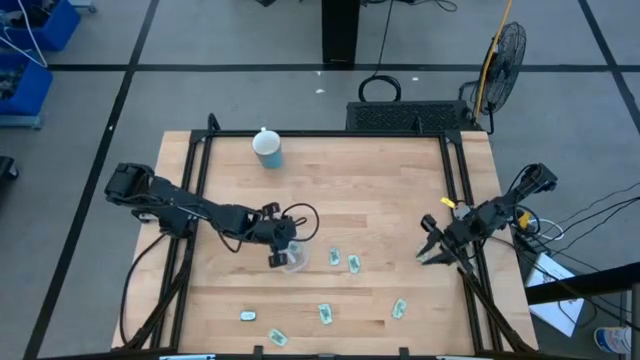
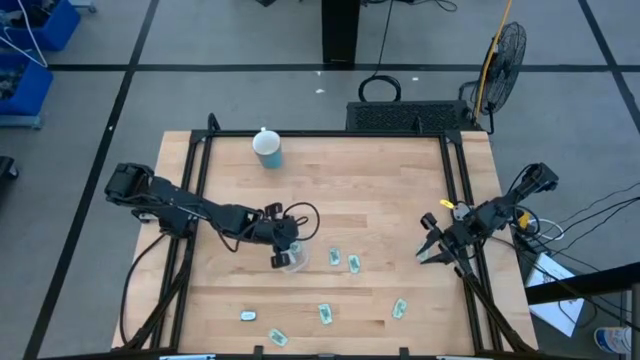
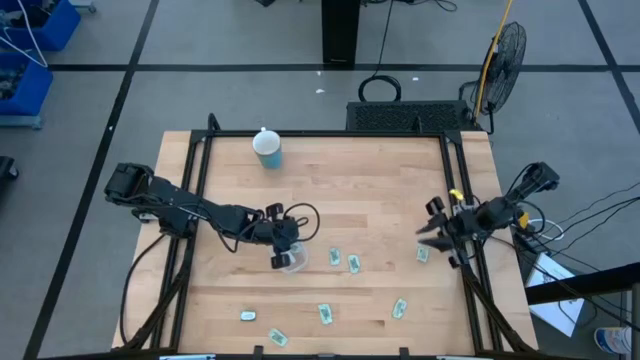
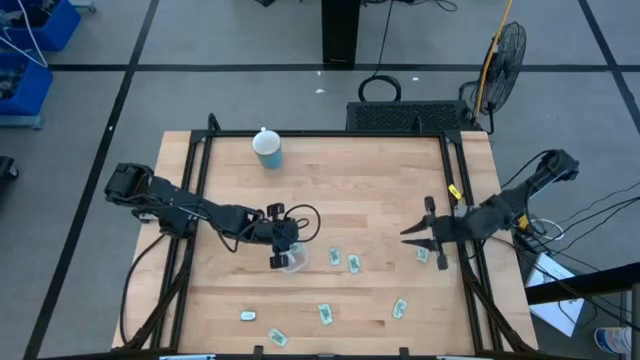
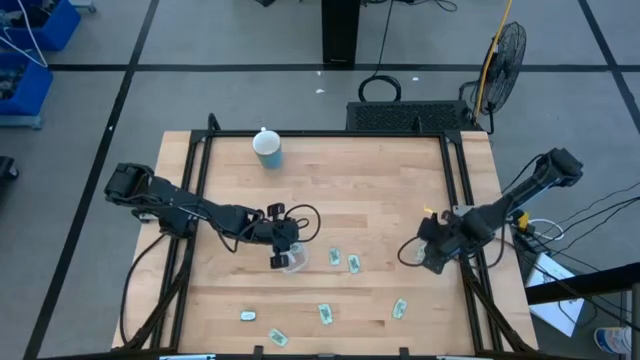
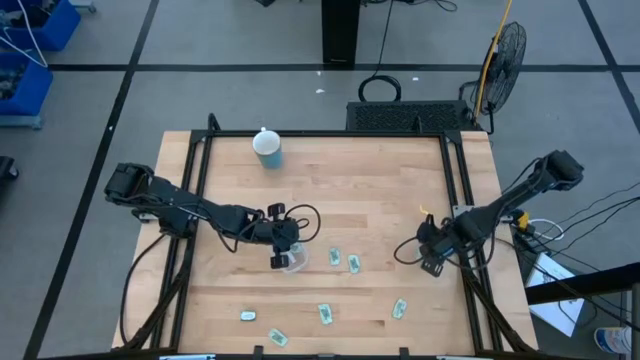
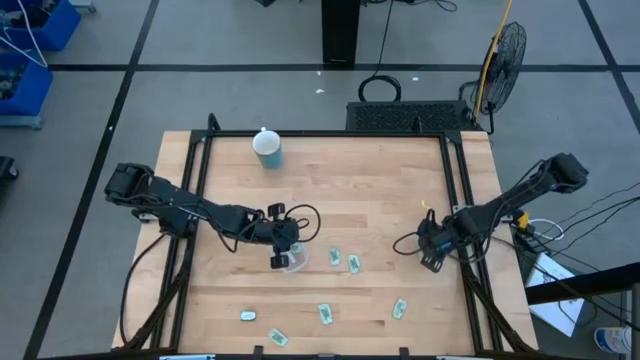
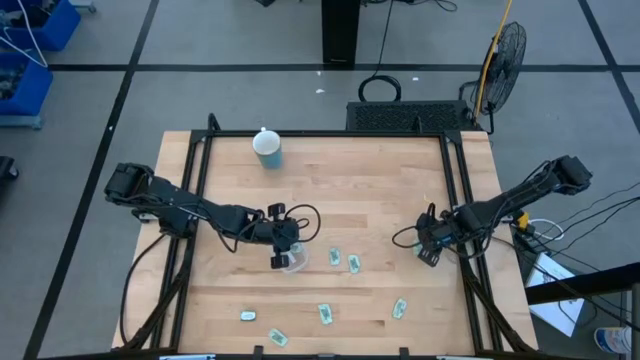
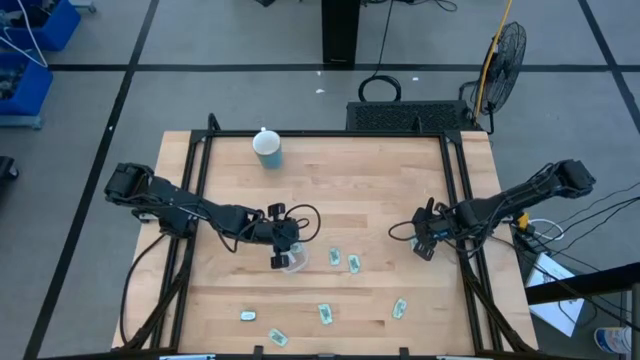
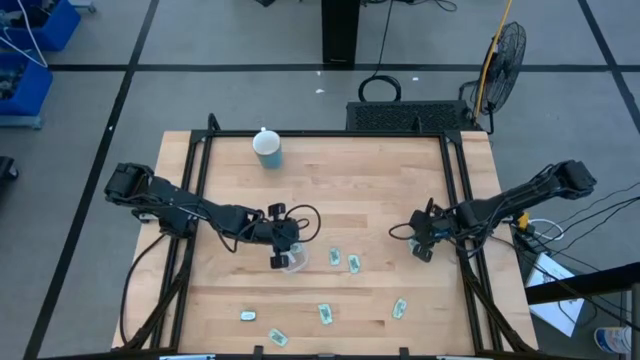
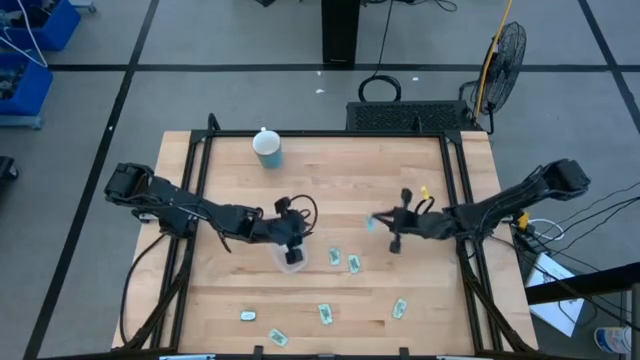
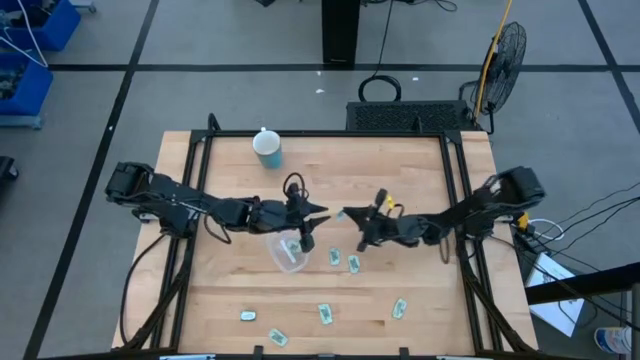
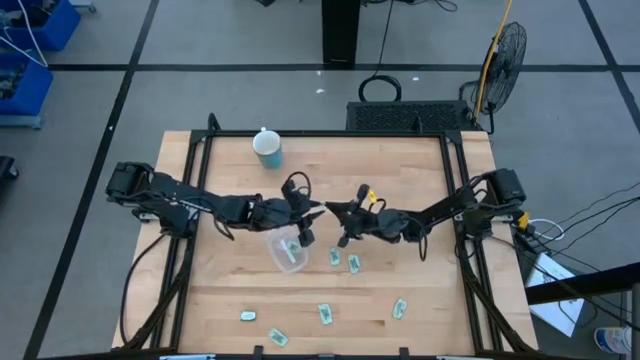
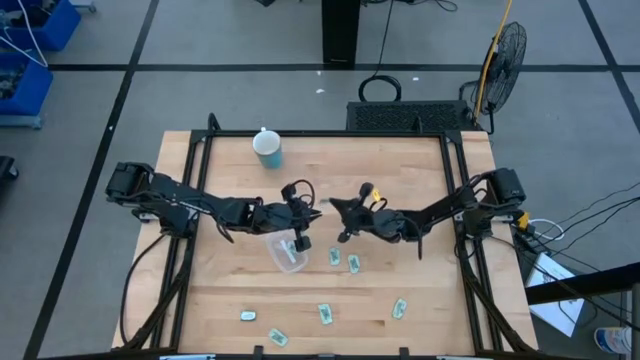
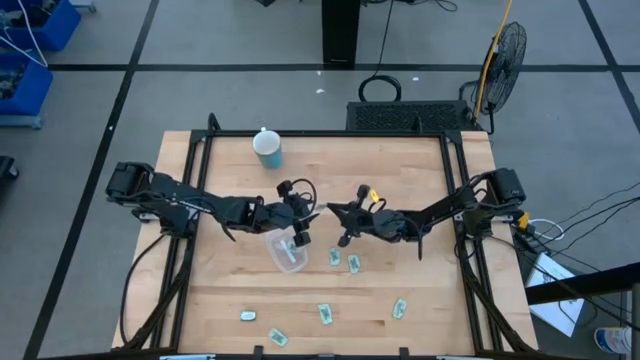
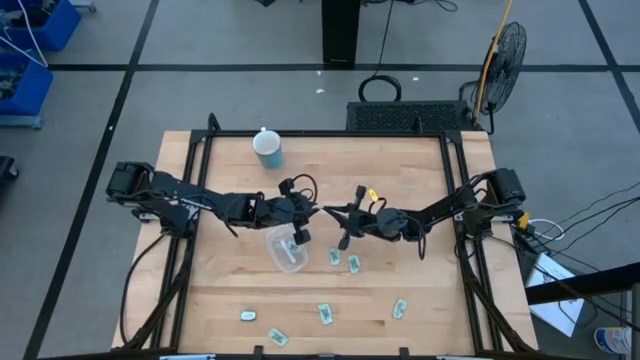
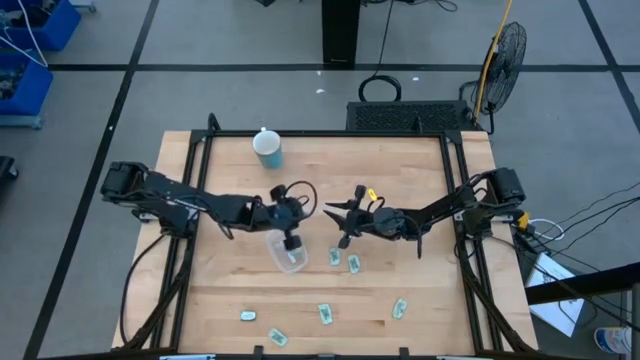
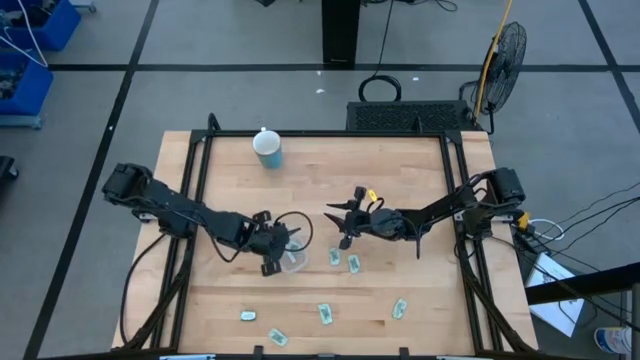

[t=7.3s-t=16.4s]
Task: Pick and place Stevia / Truvia into bins
Put the stevia packet into the transparent container

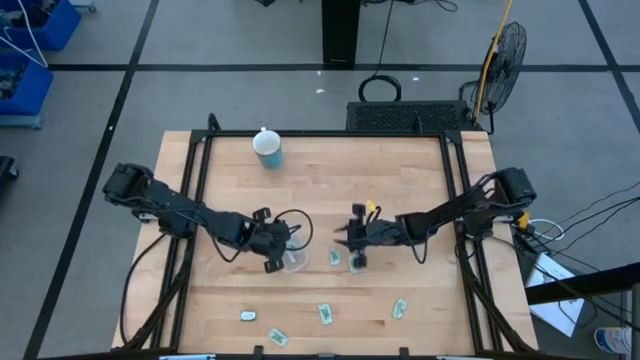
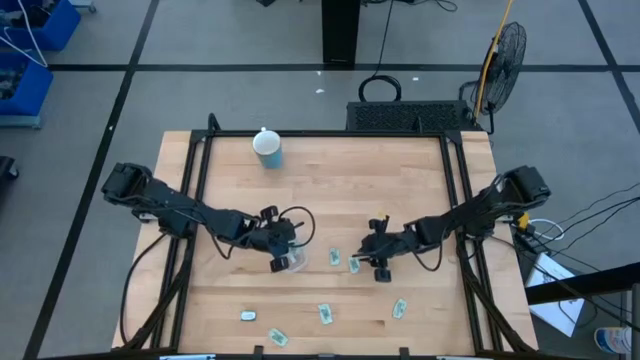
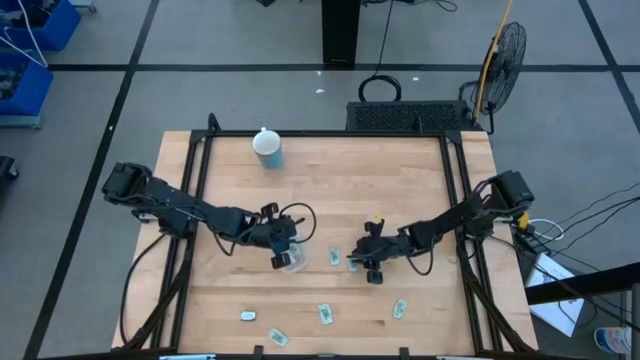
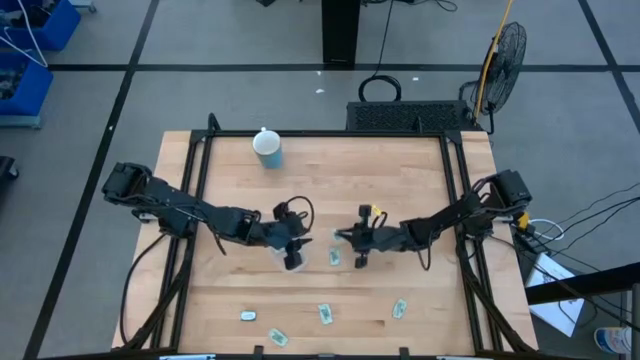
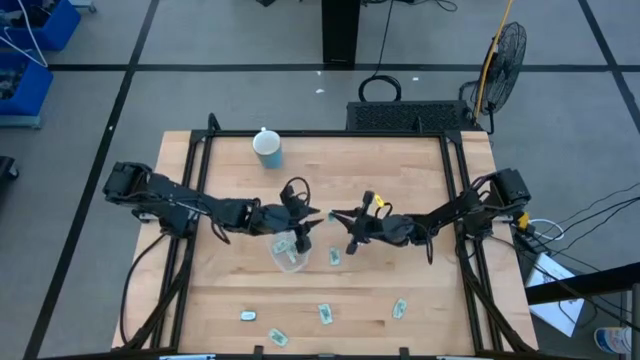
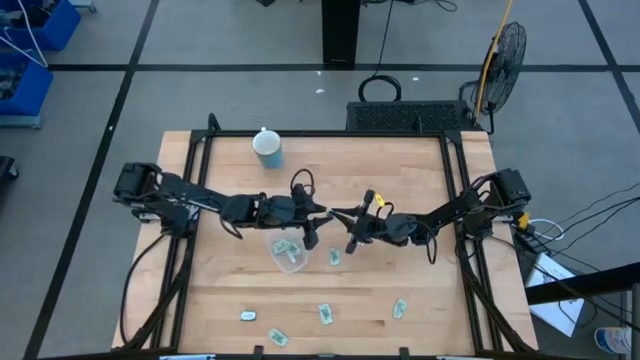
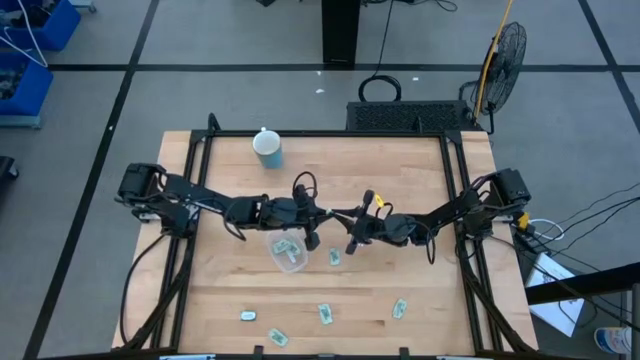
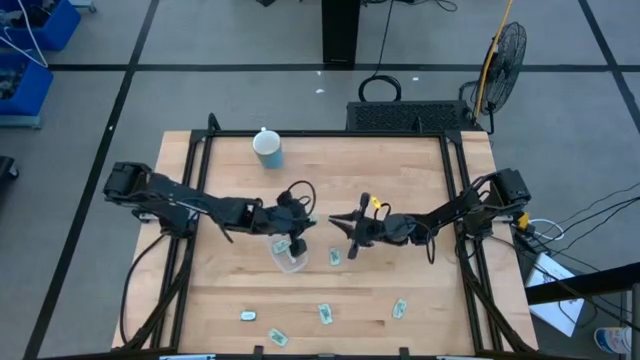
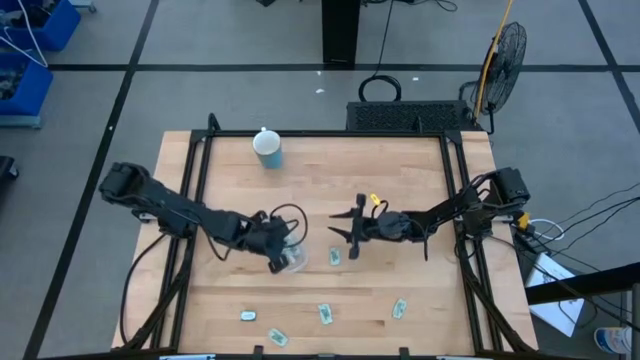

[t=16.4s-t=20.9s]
Put the stevia packet into the transparent container

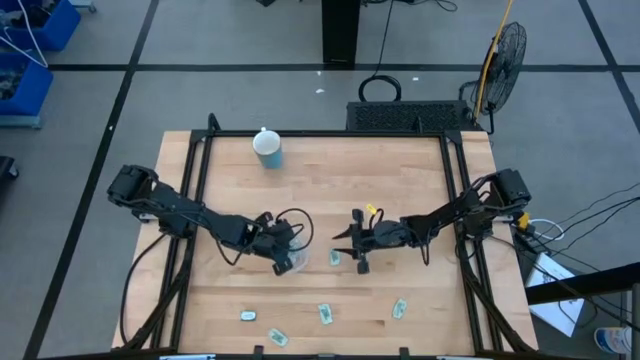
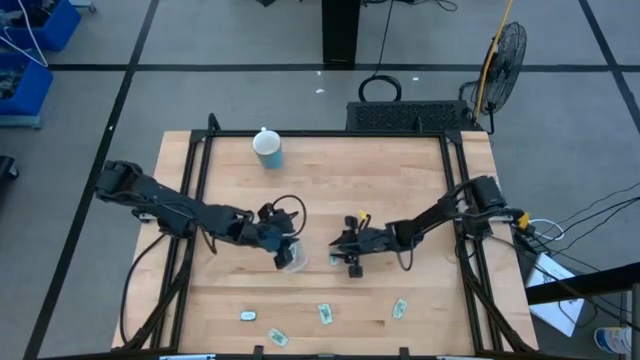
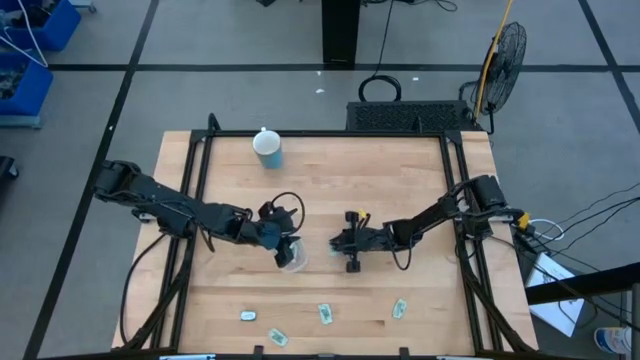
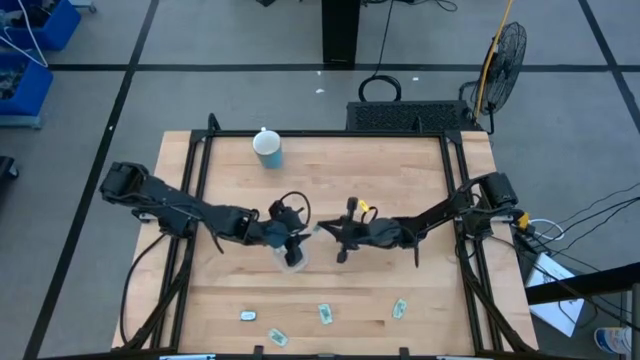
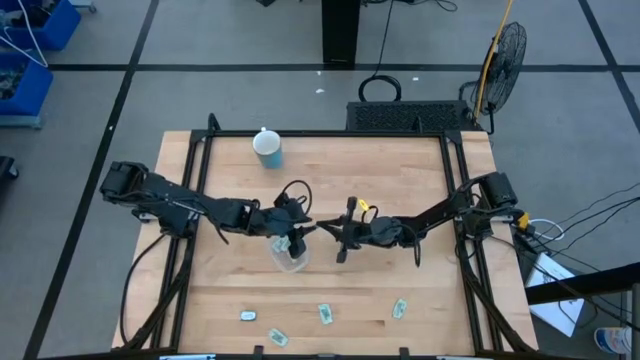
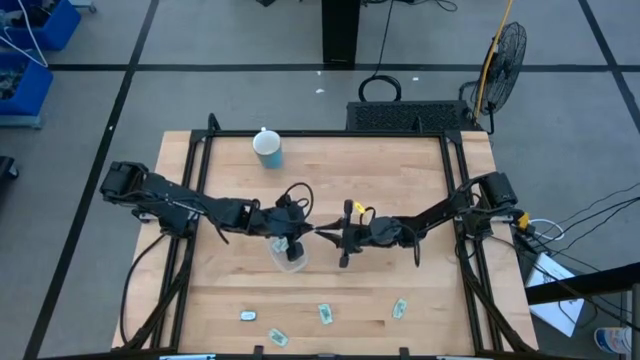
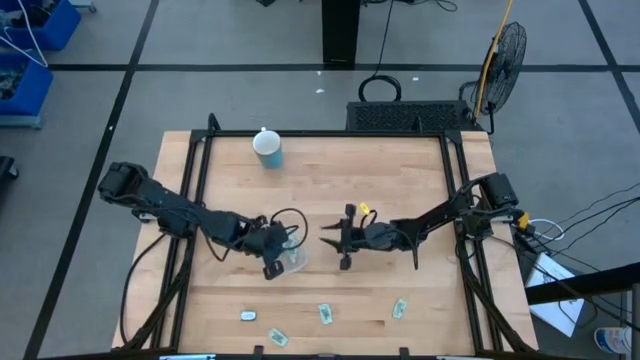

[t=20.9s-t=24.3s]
Put the stevia packet into the transparent container

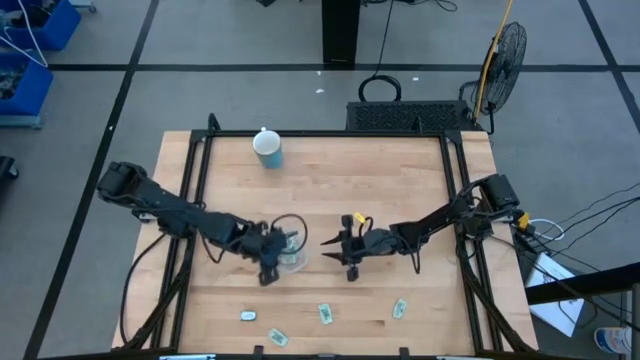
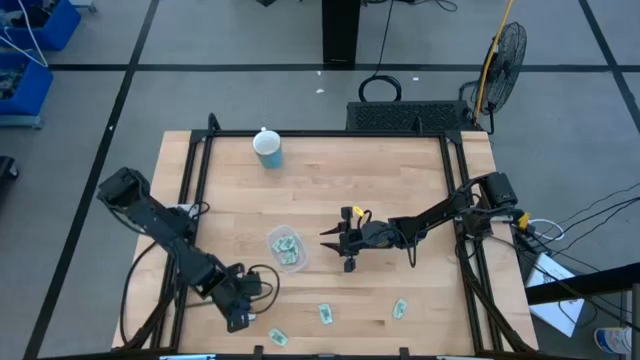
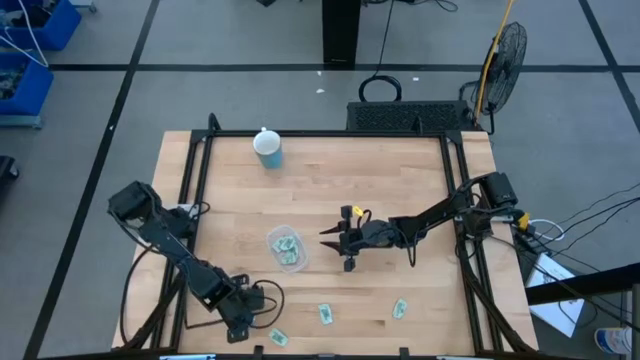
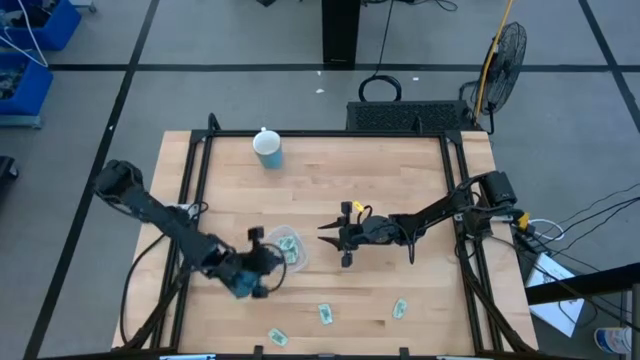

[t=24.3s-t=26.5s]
Put the stevia packet into the transparent container

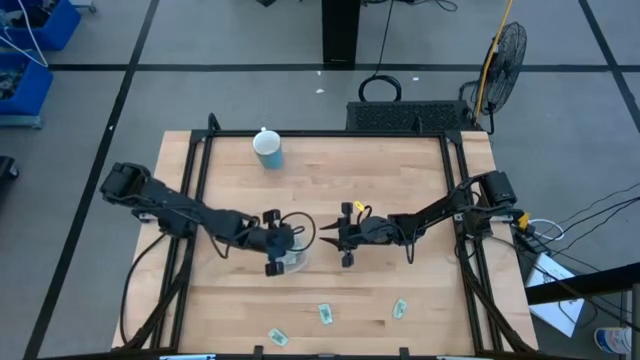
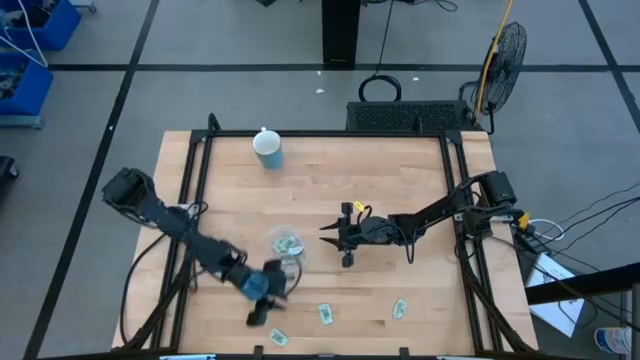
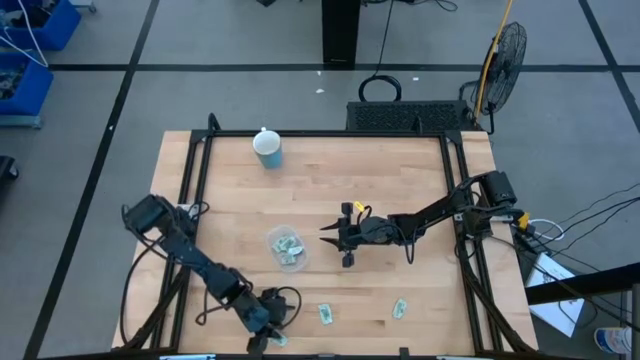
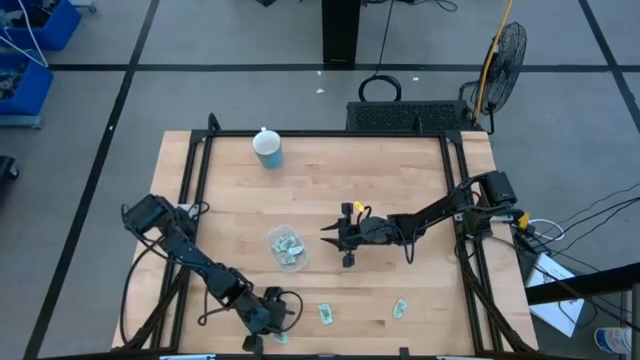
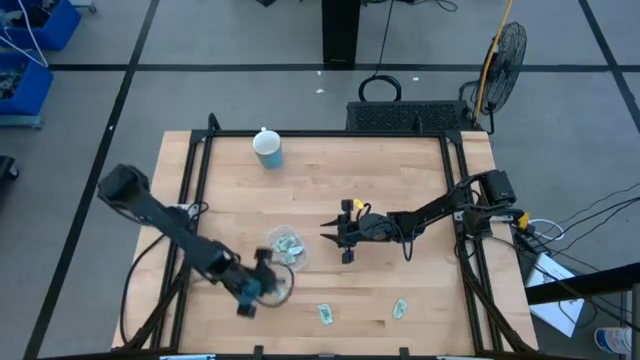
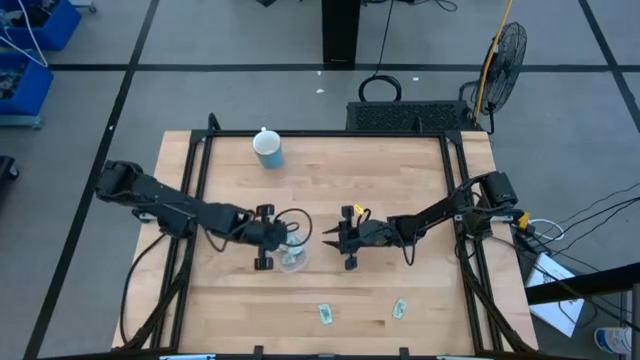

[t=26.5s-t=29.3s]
Put the stevia packet into the transparent container
